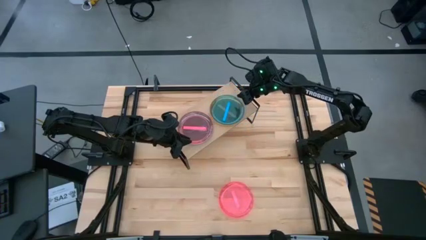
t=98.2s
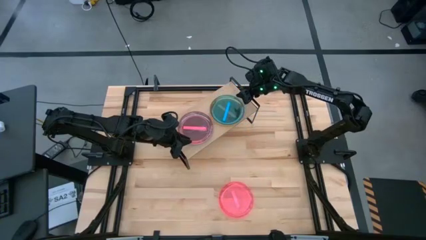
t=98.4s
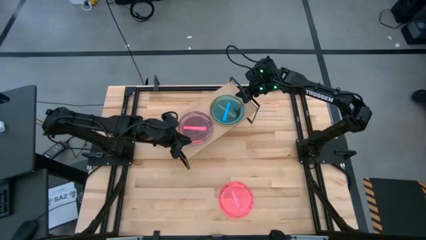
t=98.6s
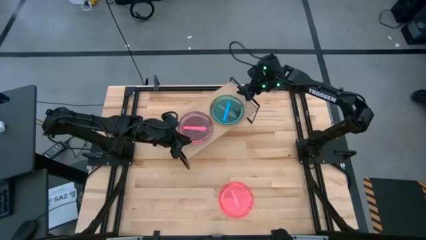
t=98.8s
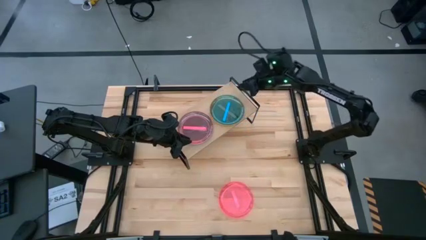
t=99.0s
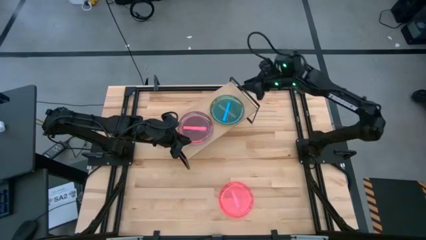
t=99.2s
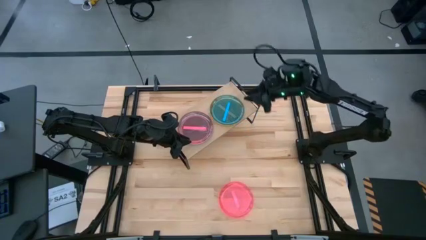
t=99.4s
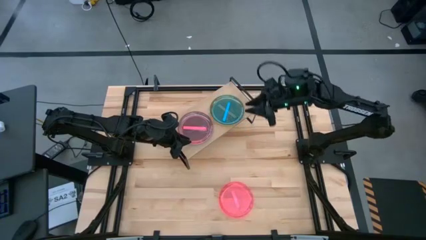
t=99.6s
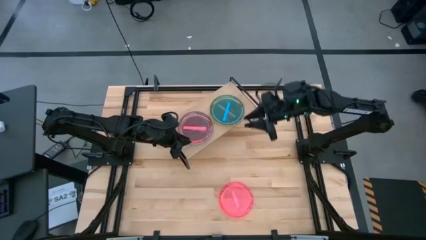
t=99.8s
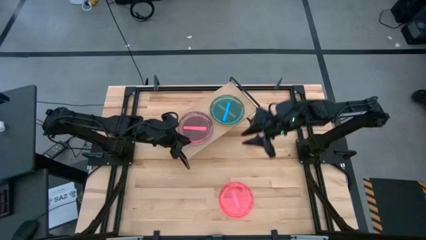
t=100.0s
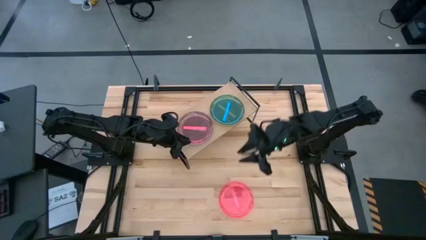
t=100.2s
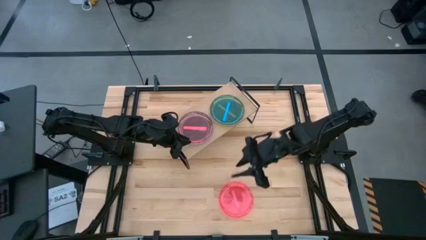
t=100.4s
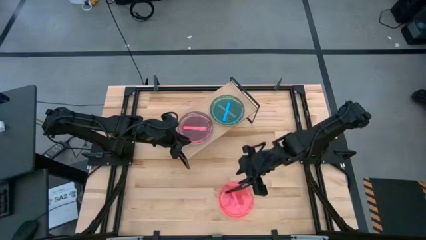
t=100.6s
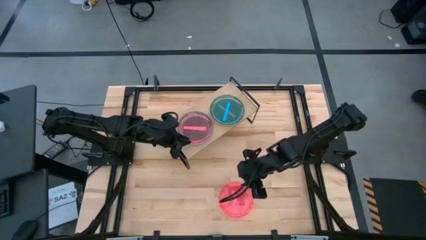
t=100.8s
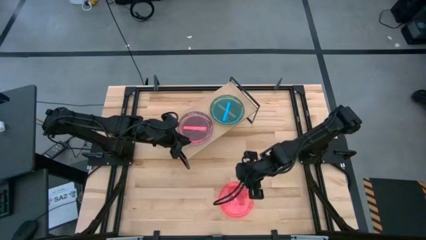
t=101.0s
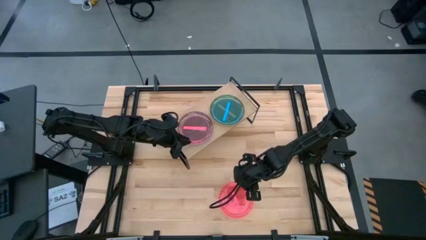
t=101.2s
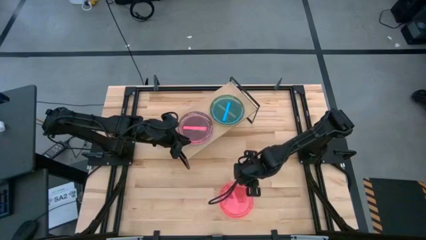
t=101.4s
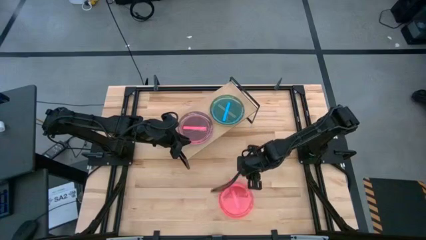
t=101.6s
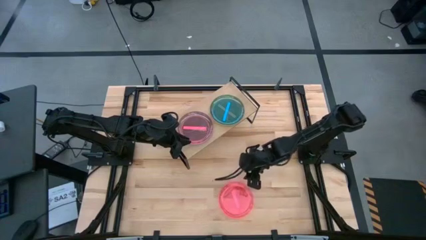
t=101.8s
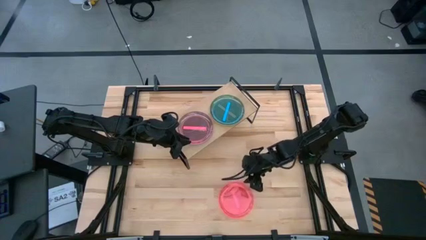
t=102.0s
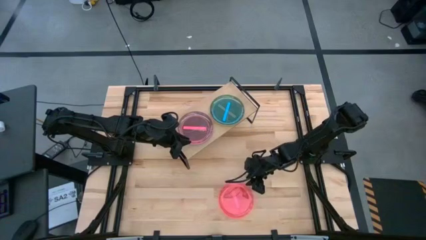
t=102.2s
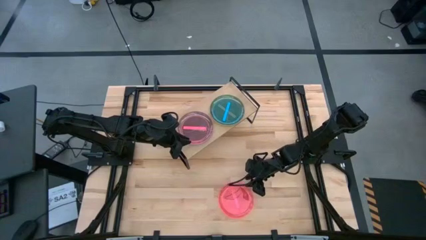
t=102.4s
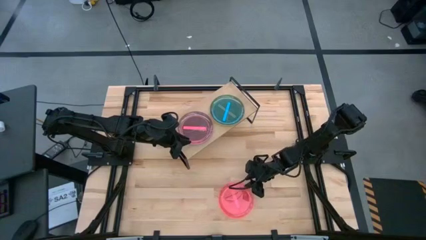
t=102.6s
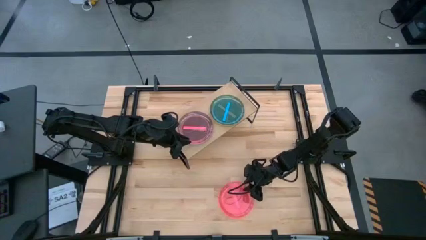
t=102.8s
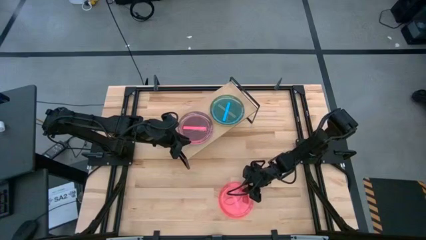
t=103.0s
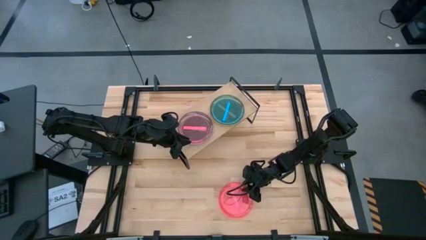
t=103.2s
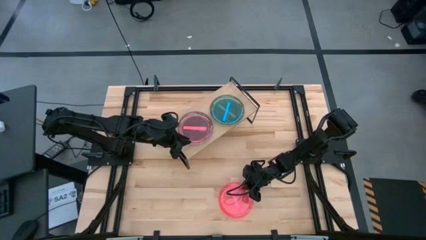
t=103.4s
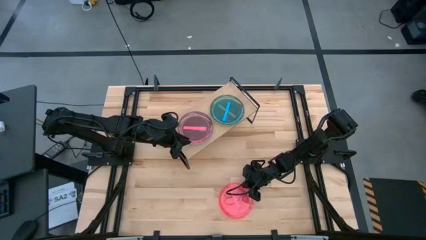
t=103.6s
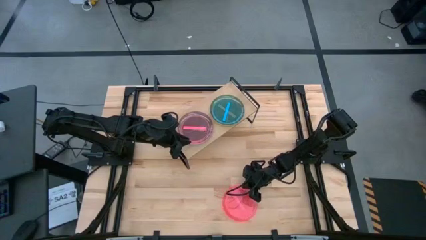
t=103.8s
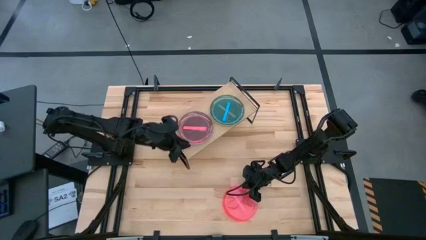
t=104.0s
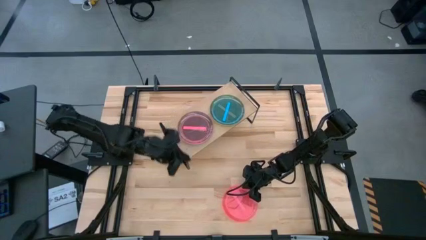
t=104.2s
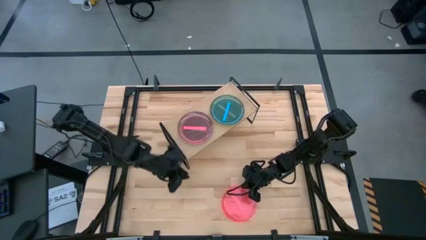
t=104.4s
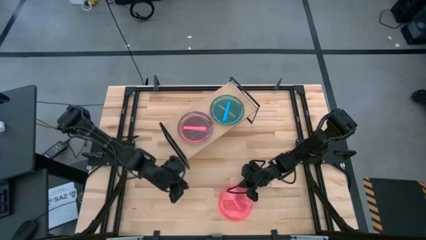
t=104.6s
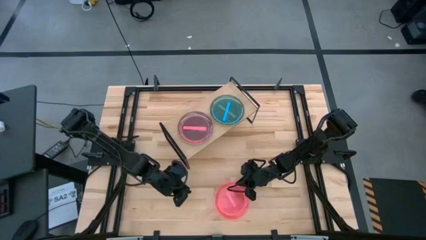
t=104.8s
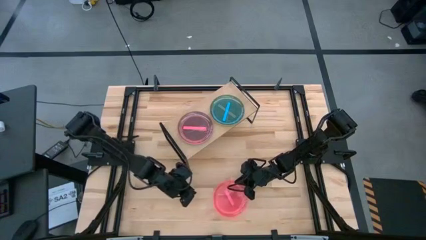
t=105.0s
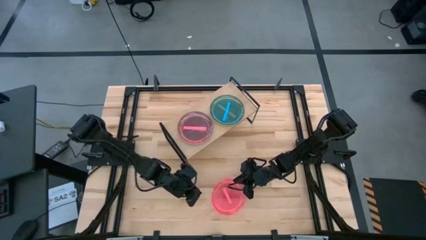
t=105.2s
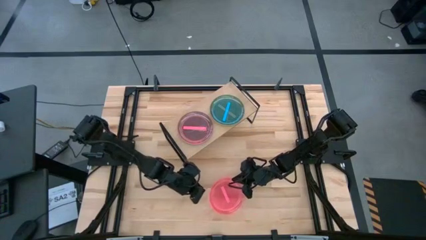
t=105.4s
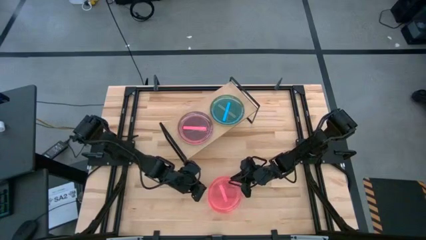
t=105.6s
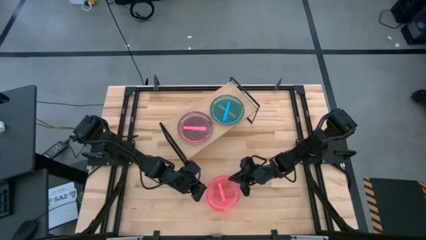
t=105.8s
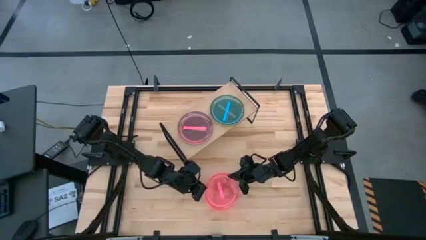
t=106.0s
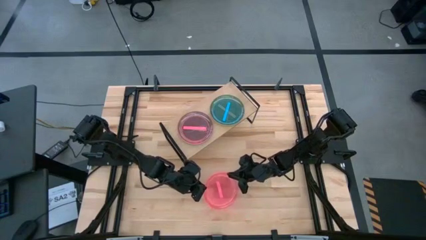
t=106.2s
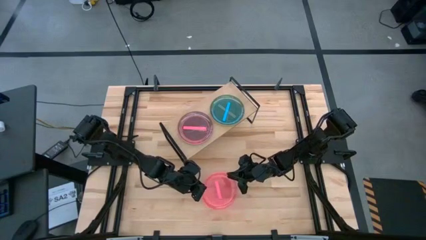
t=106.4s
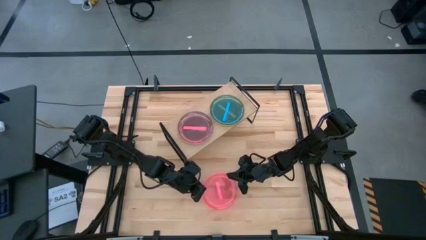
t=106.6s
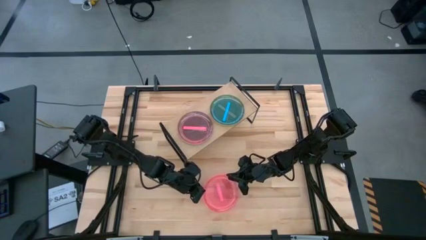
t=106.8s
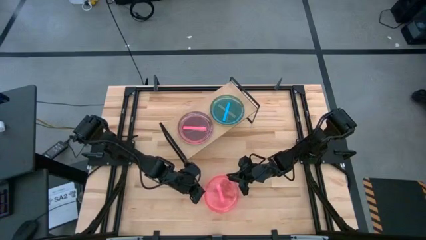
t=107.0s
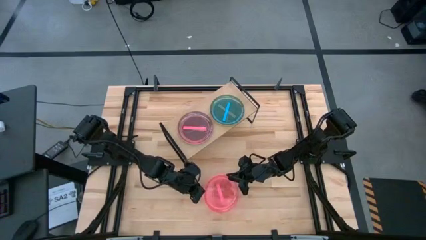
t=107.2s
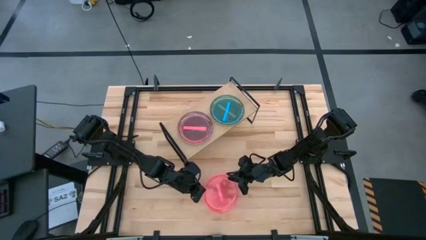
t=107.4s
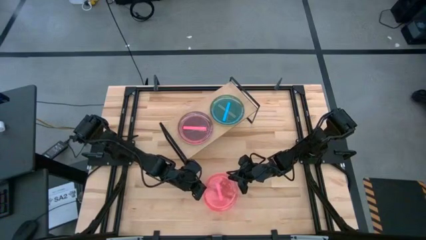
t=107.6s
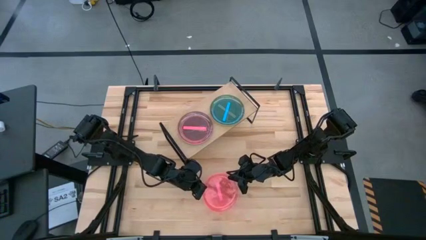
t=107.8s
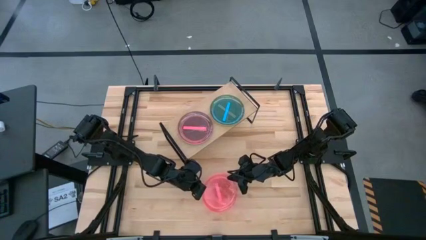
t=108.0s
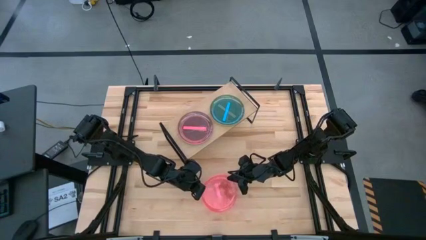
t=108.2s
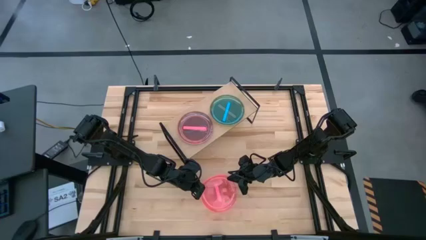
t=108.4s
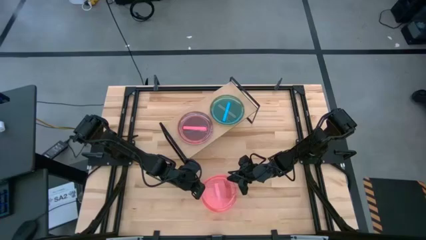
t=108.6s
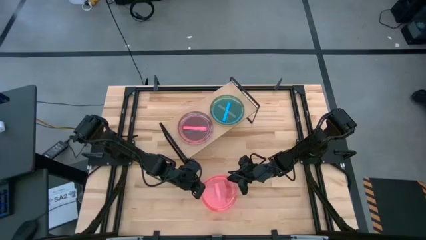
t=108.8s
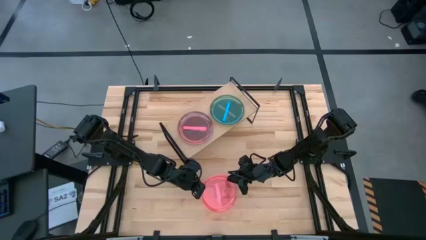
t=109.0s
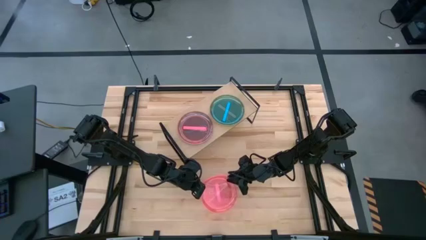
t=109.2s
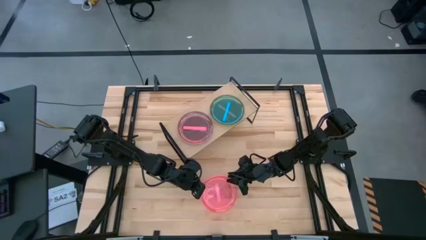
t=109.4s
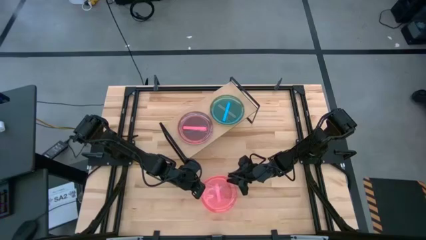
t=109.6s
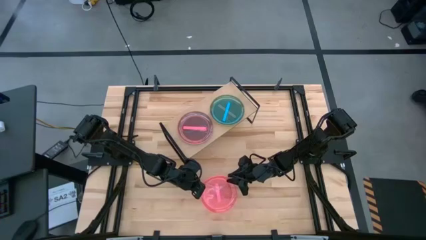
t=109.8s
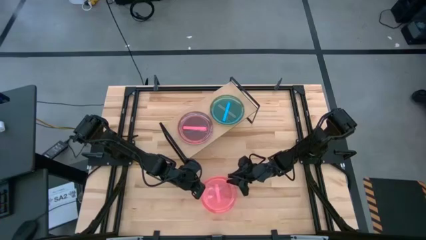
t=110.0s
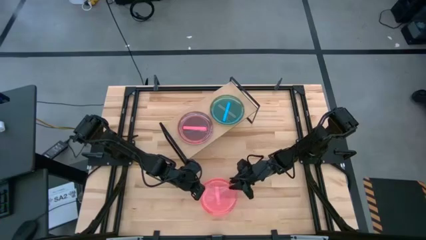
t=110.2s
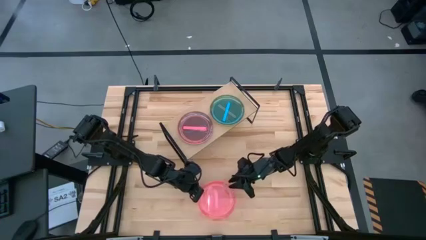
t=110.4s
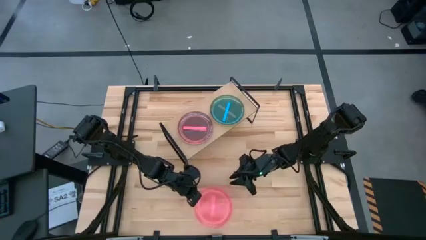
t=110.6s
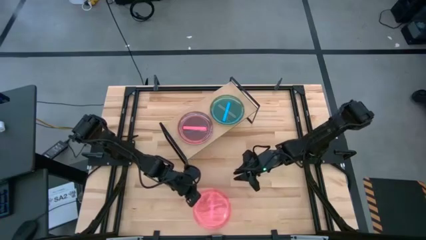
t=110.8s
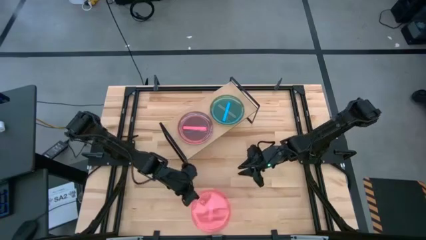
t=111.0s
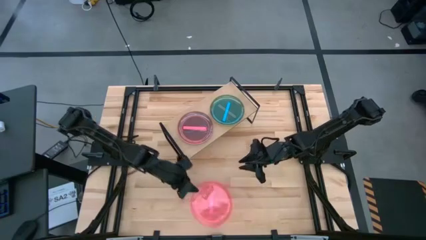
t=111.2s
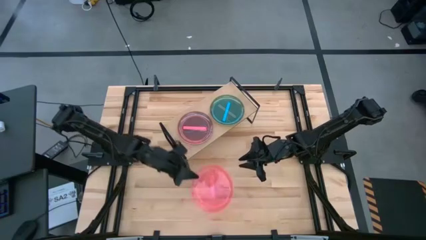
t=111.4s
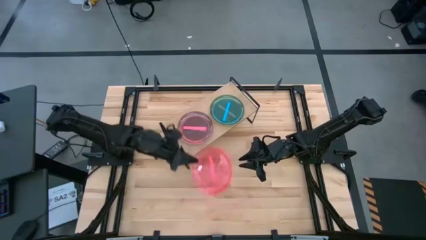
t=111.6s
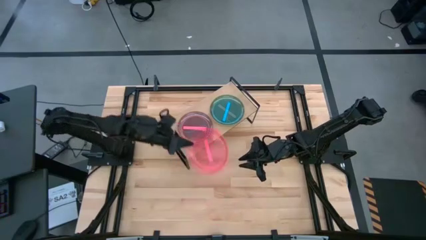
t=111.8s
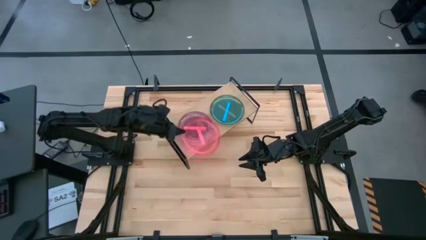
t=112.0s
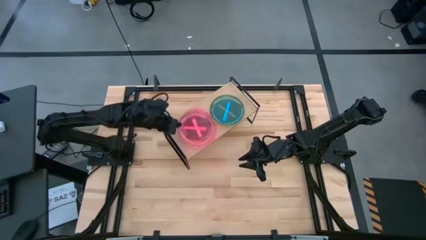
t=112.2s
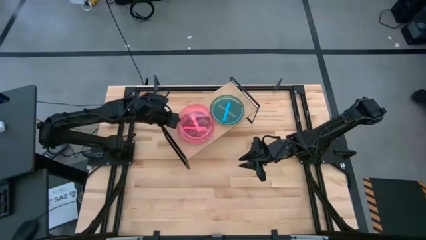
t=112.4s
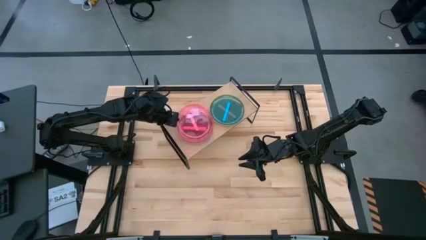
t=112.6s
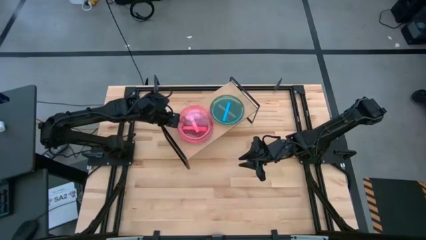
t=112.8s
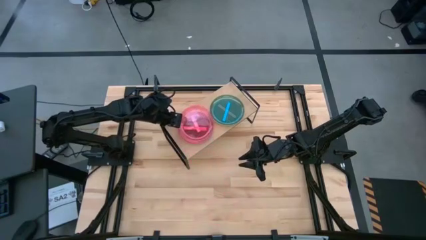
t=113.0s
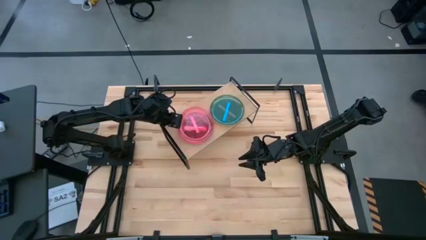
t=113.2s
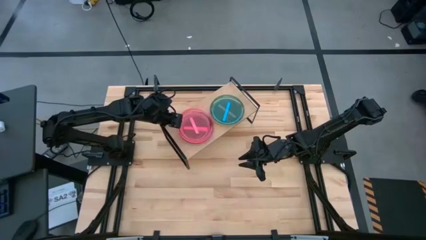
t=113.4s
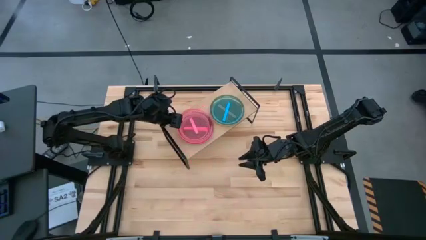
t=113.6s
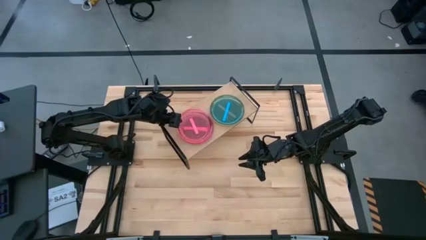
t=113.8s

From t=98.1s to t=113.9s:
Task: Place and stack plates onto a shelf
Stack one pink plate on the other pink plate on the shelf
